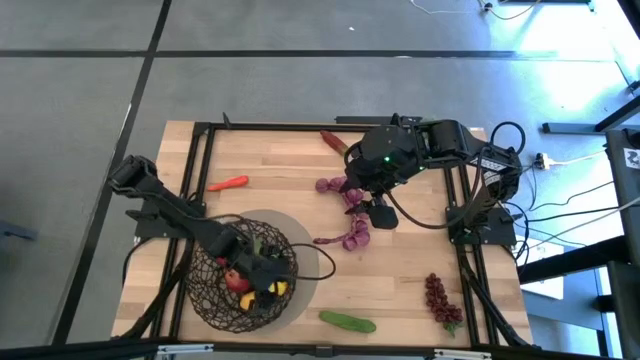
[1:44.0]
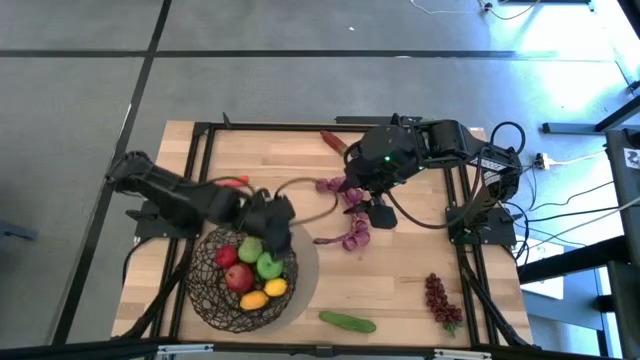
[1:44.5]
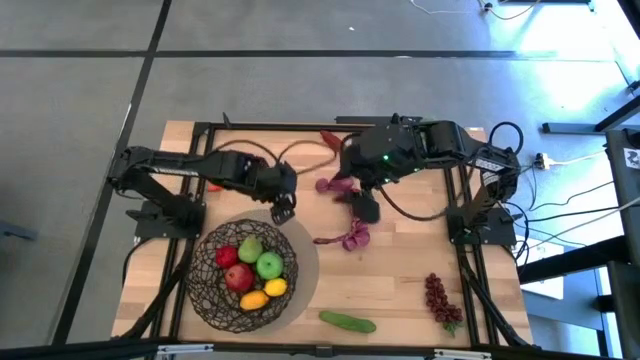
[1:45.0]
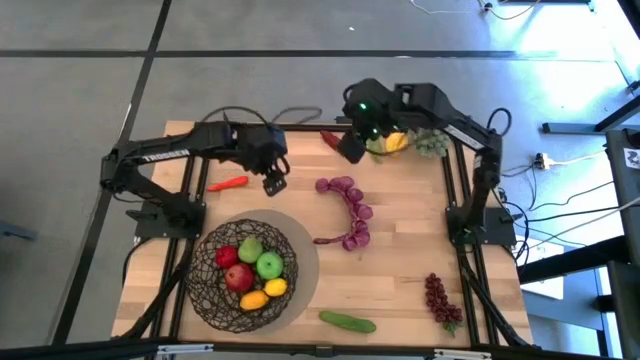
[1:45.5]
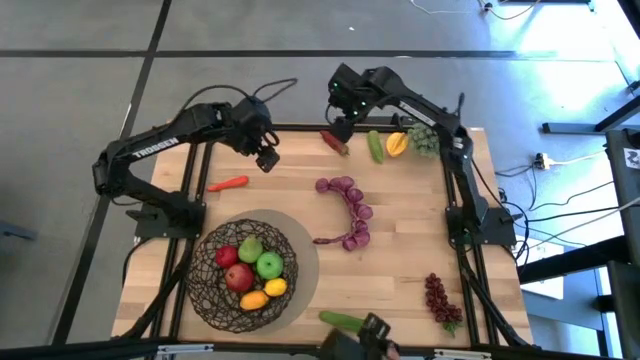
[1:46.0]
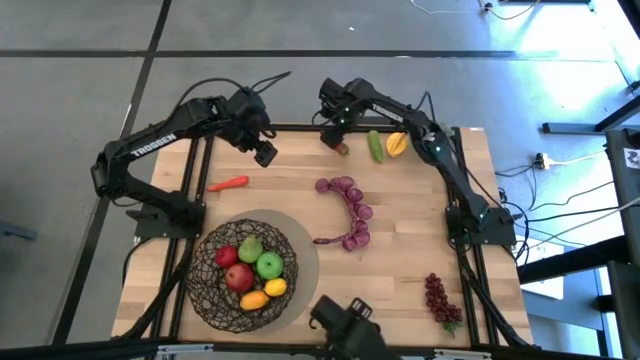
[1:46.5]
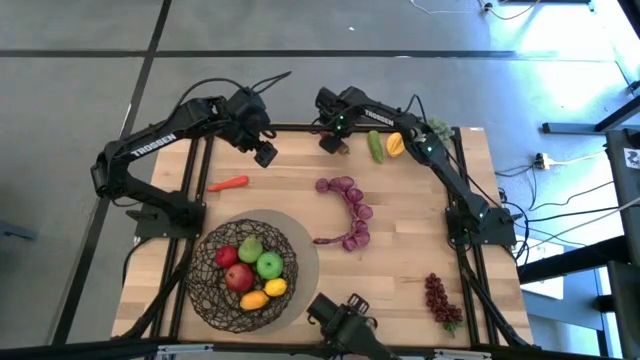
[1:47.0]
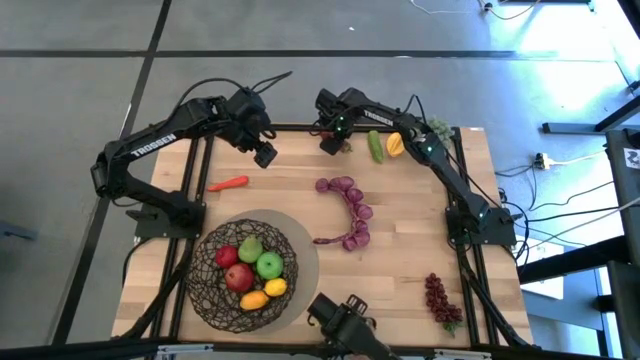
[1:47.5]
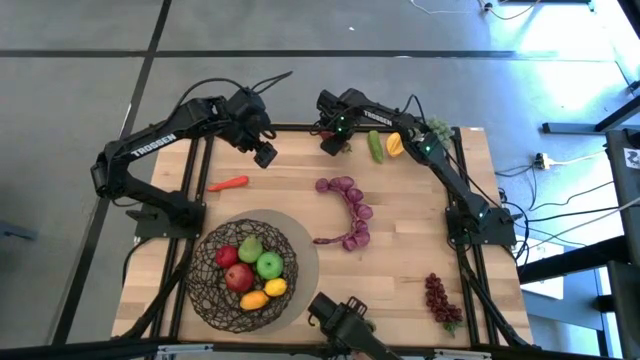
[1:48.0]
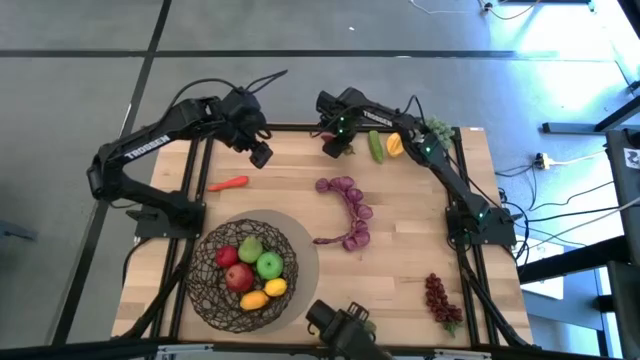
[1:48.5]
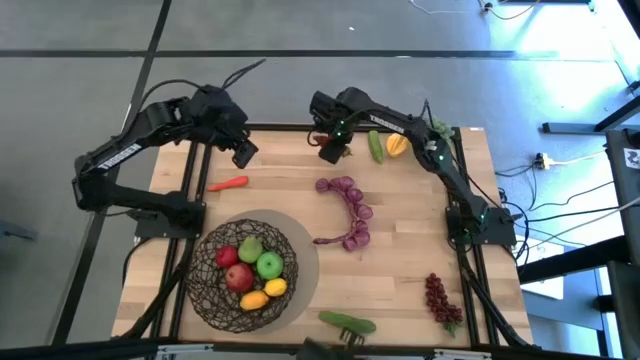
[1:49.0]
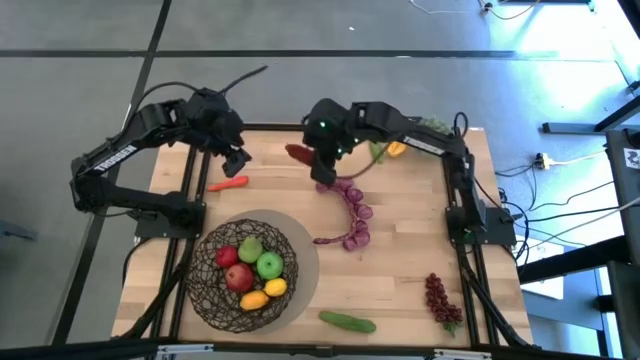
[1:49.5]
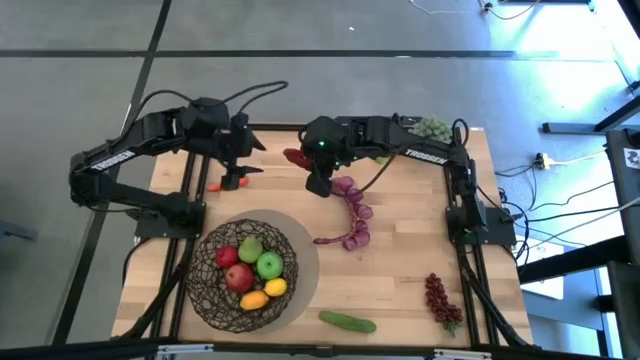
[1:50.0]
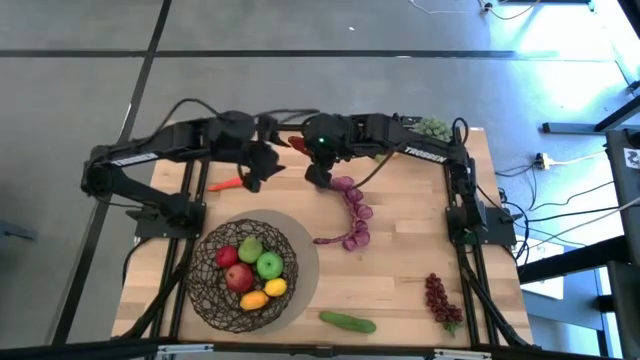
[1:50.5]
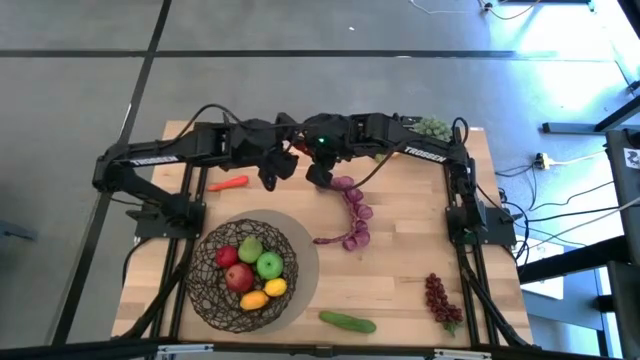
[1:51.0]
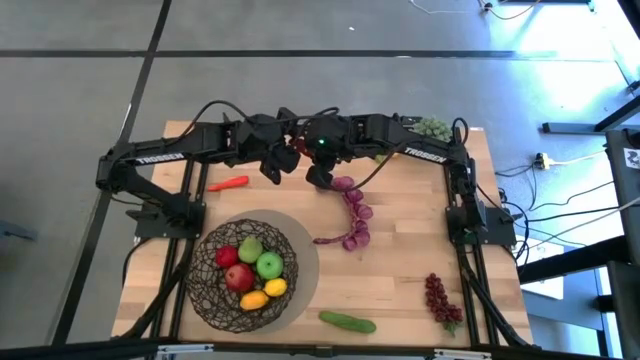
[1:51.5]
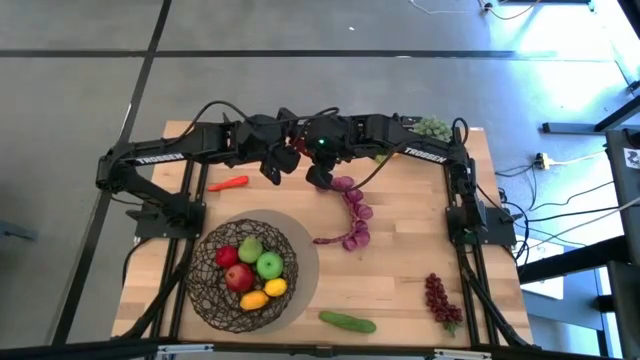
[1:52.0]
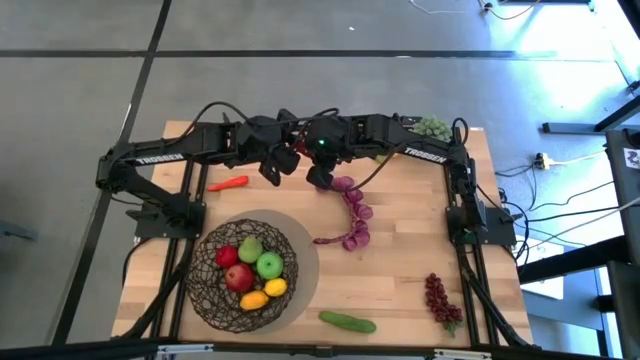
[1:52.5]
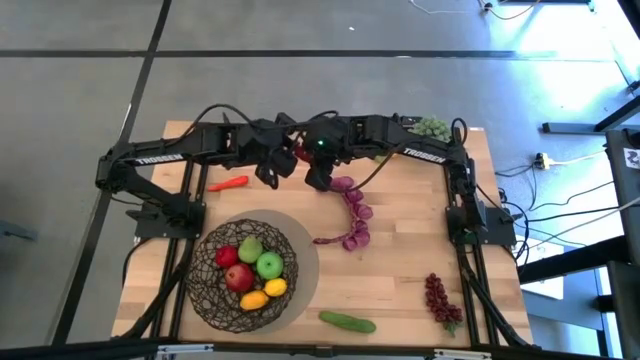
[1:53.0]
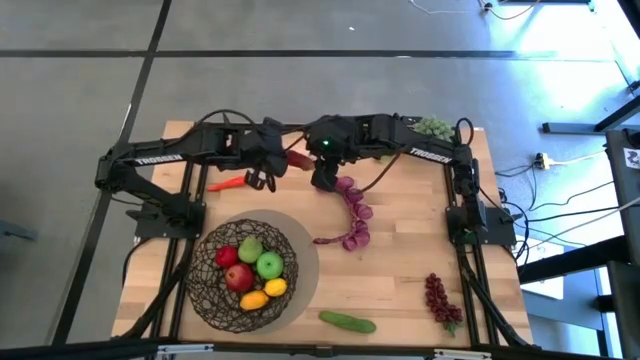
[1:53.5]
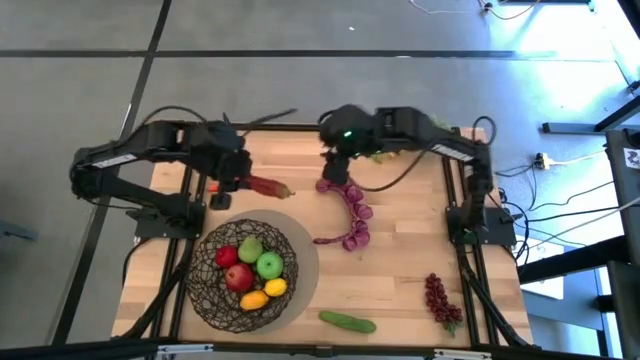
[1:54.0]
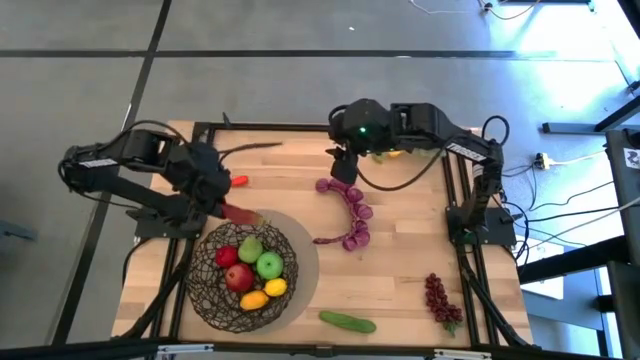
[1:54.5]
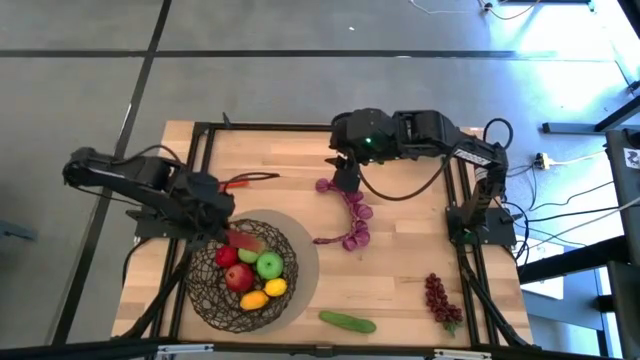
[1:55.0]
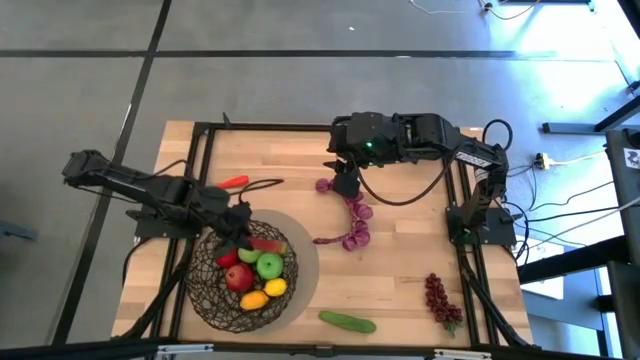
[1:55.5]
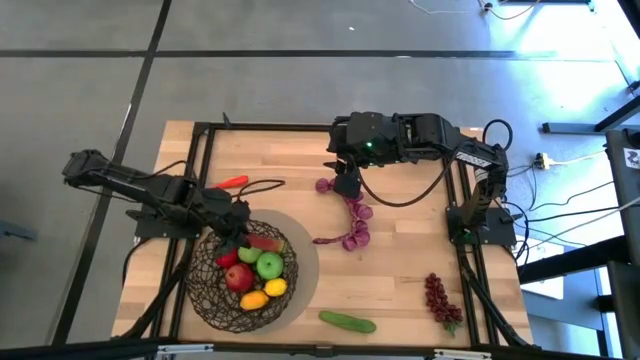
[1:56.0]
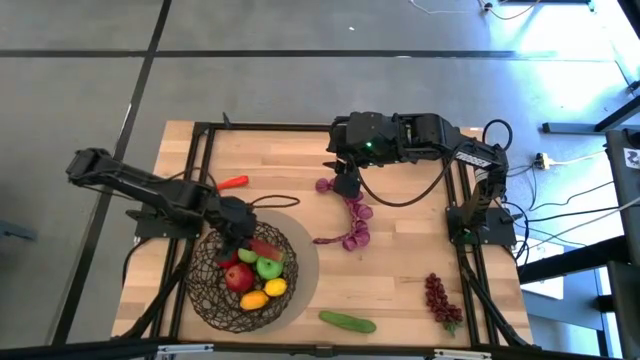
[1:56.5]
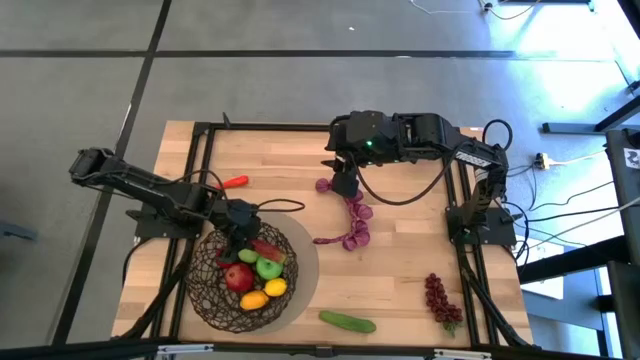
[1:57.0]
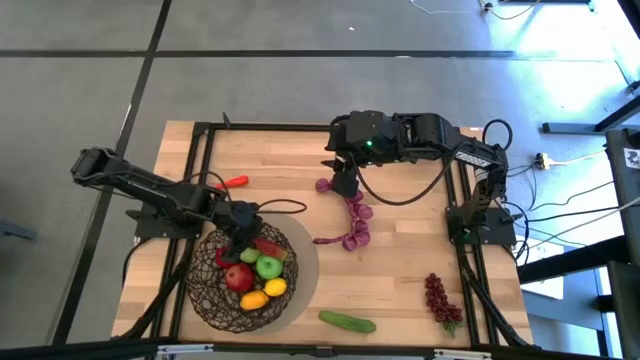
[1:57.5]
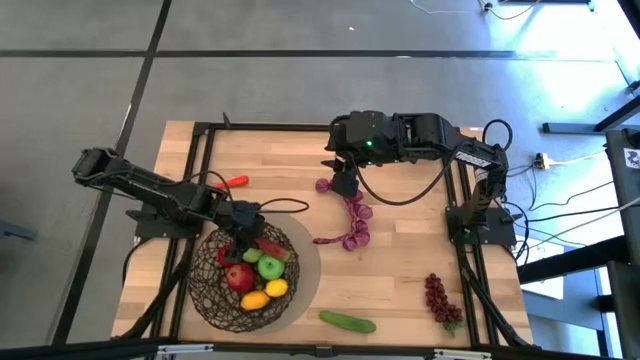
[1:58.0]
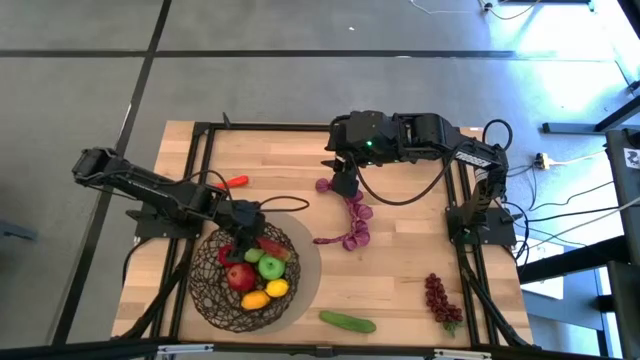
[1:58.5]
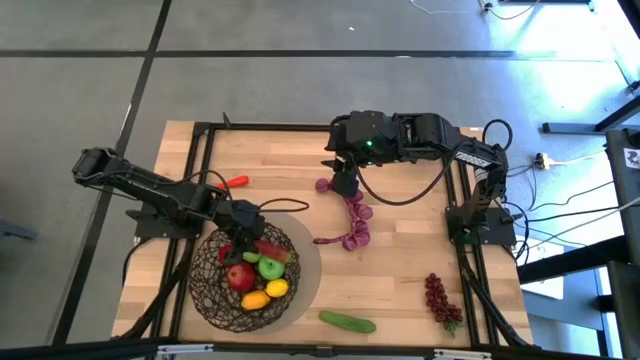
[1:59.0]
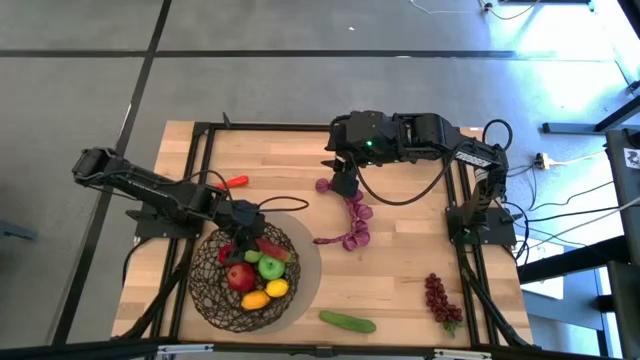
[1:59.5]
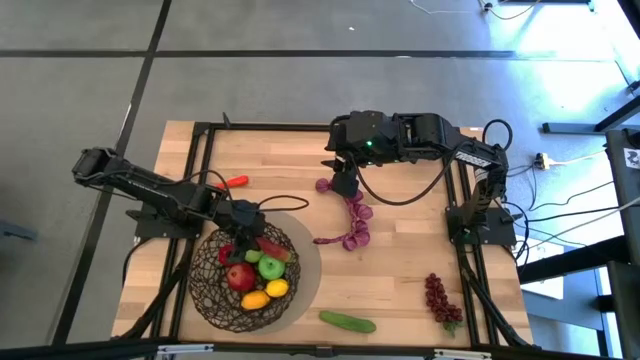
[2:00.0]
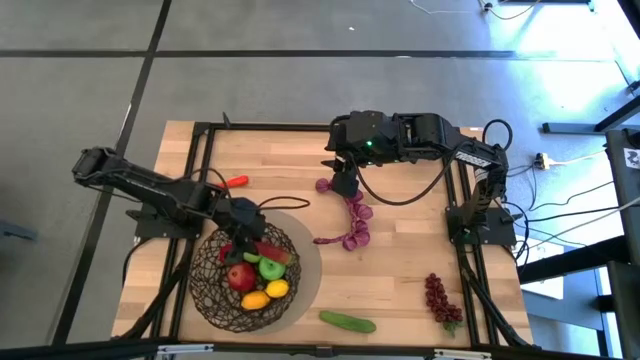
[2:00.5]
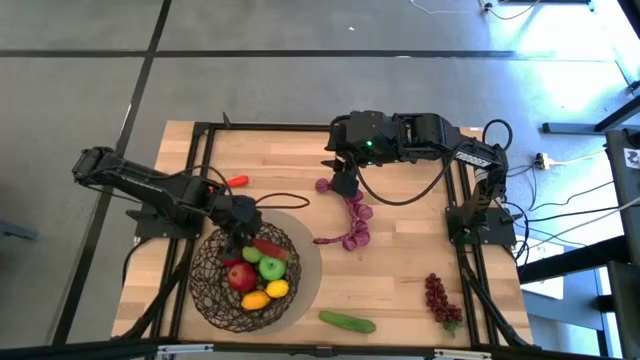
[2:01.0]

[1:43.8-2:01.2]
Task: Build produce basket
Put the red chili pepper into the black wire basket
